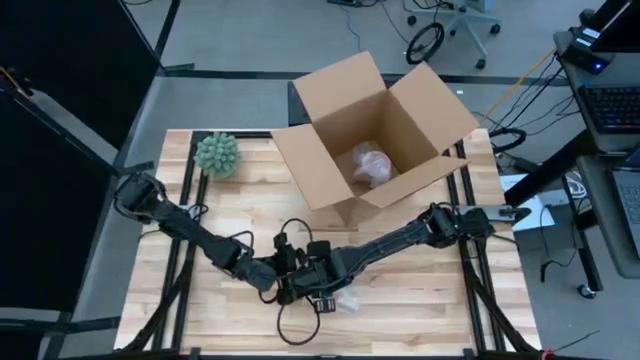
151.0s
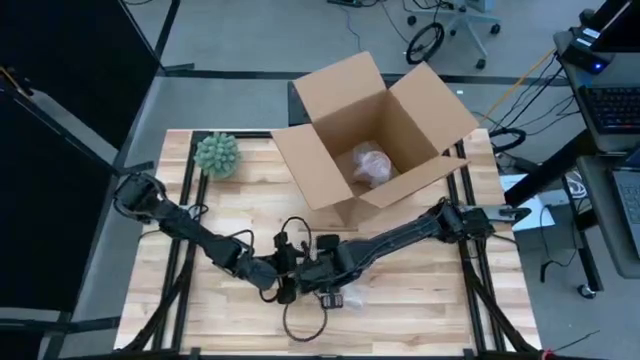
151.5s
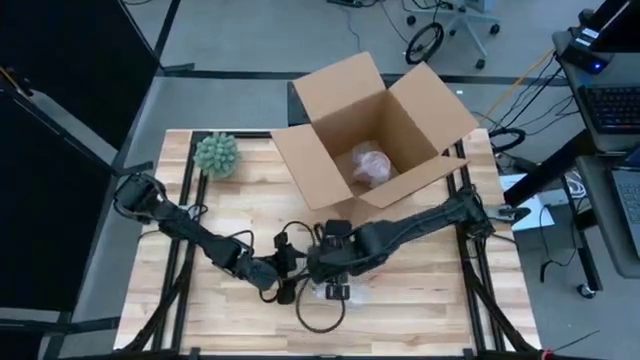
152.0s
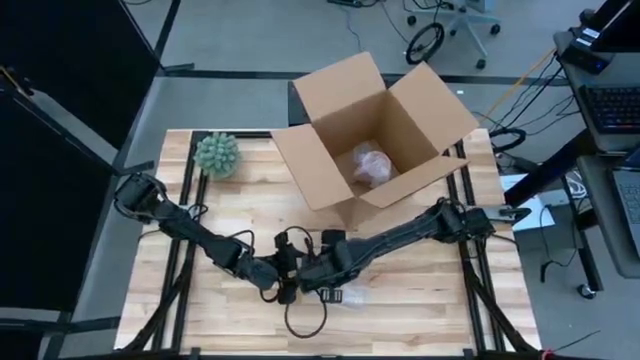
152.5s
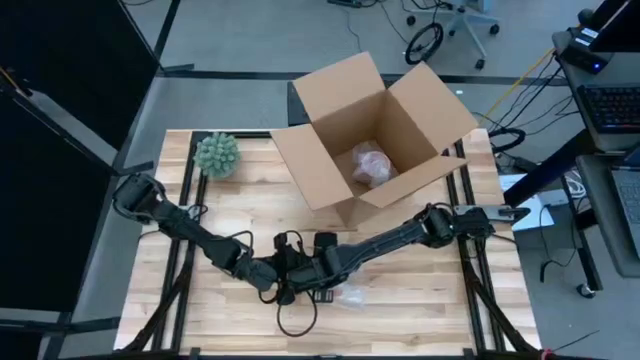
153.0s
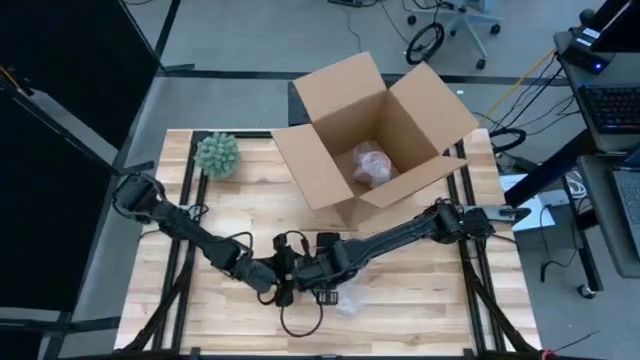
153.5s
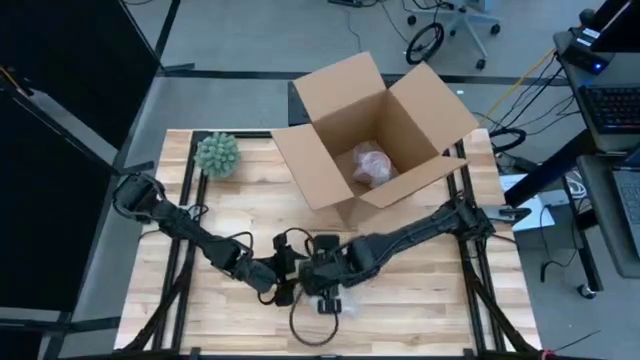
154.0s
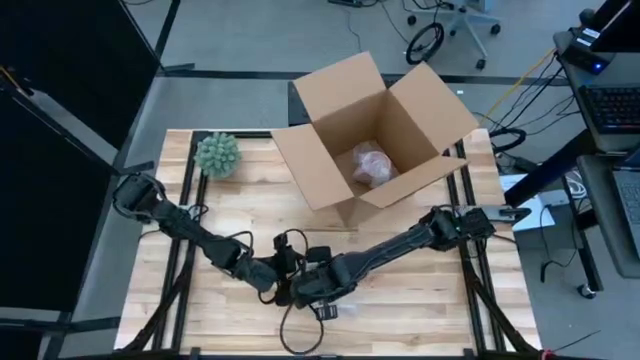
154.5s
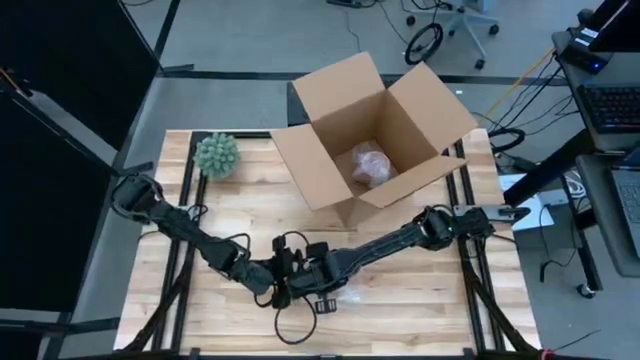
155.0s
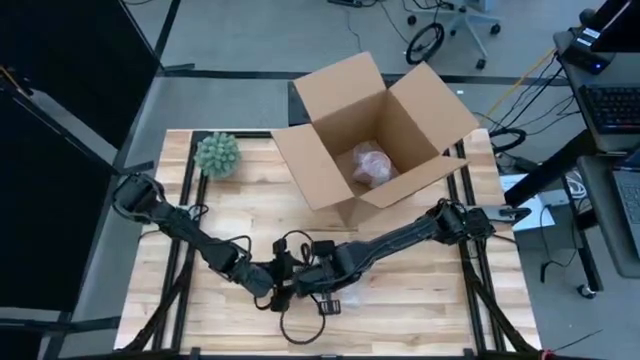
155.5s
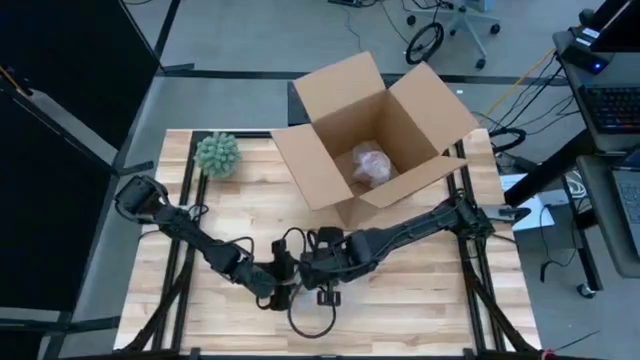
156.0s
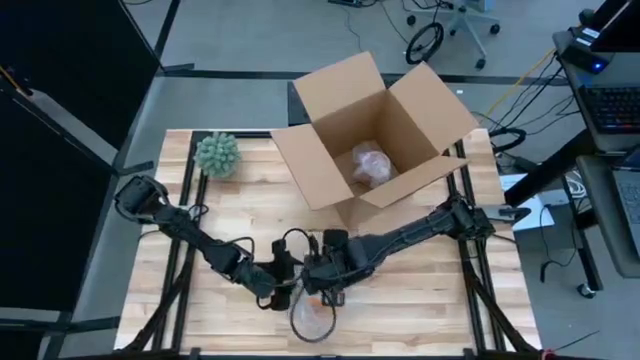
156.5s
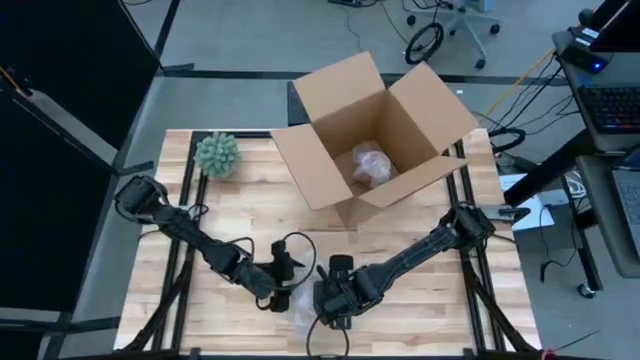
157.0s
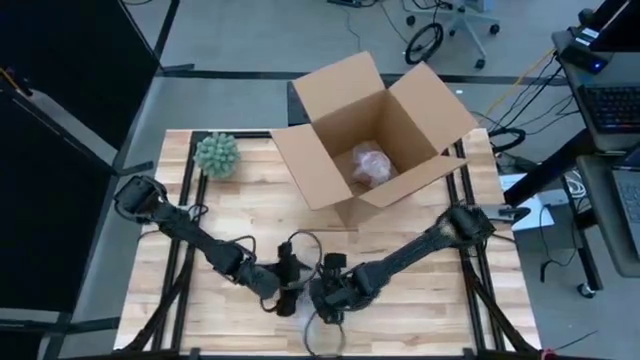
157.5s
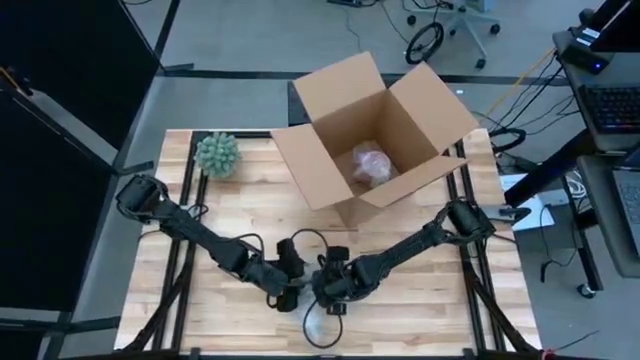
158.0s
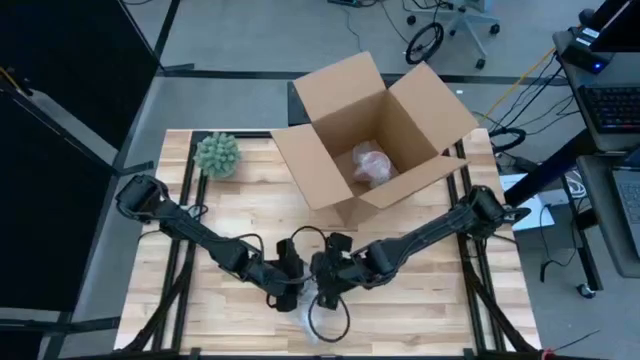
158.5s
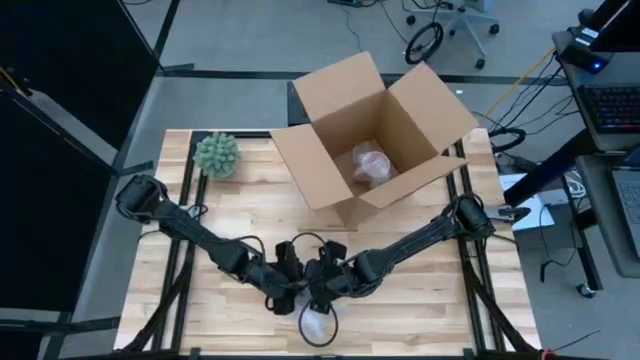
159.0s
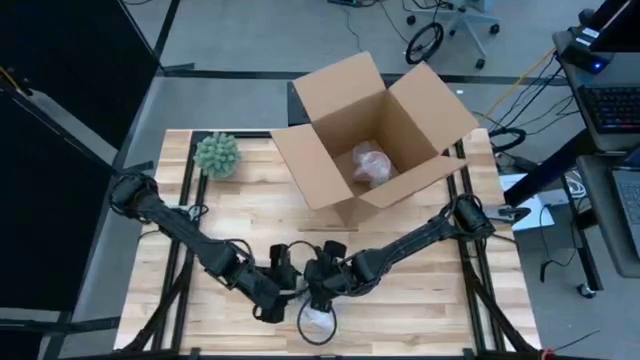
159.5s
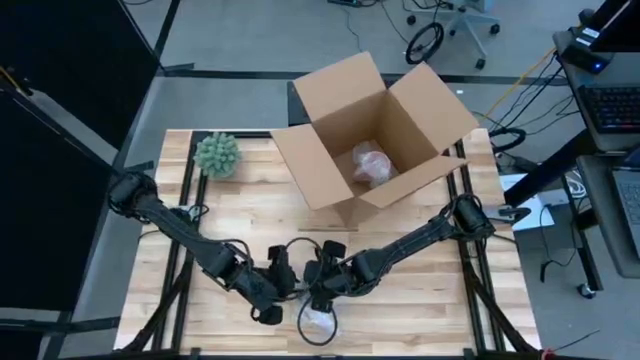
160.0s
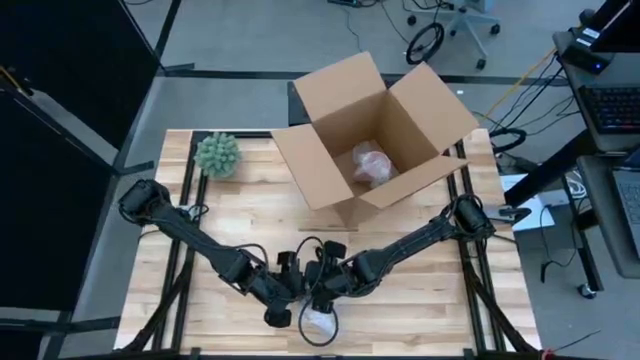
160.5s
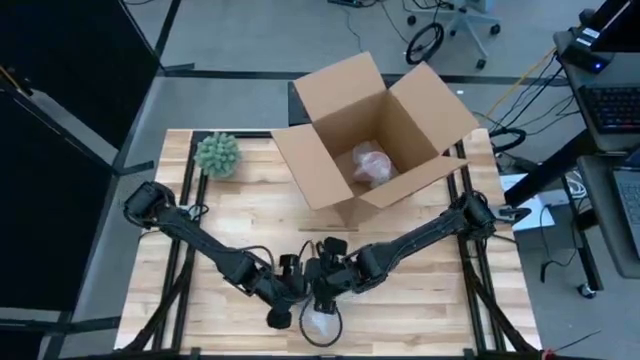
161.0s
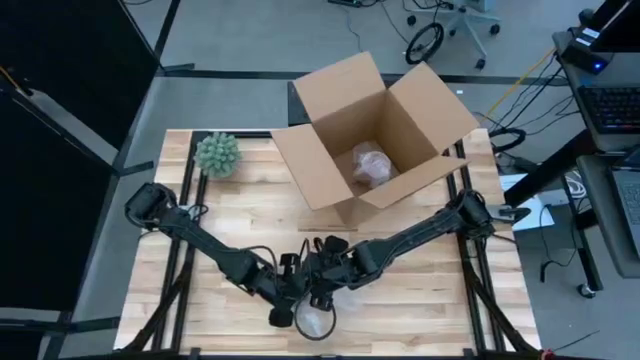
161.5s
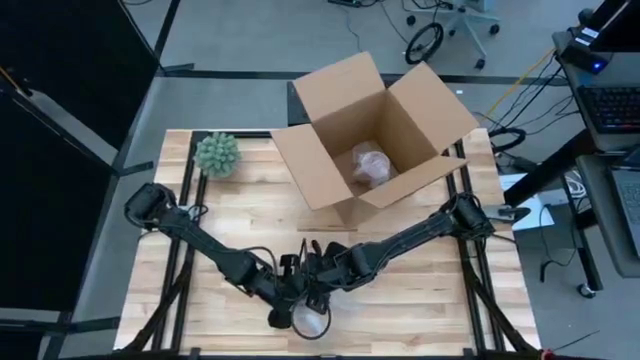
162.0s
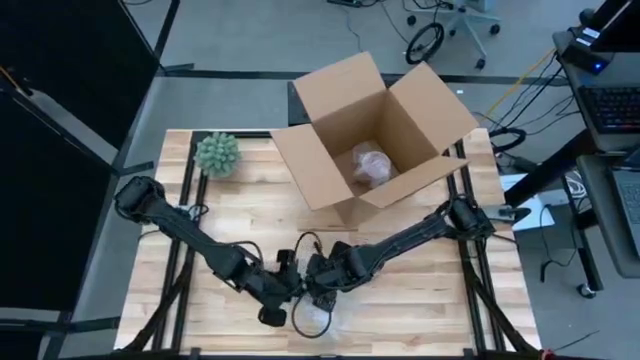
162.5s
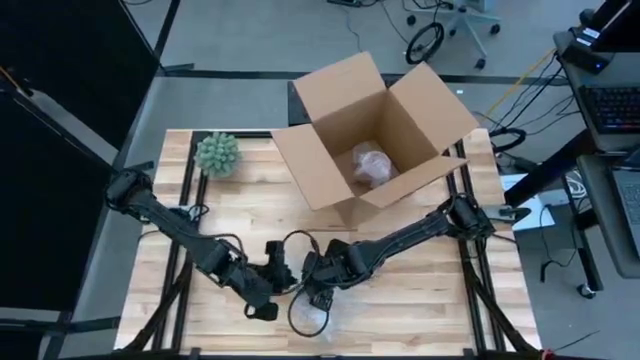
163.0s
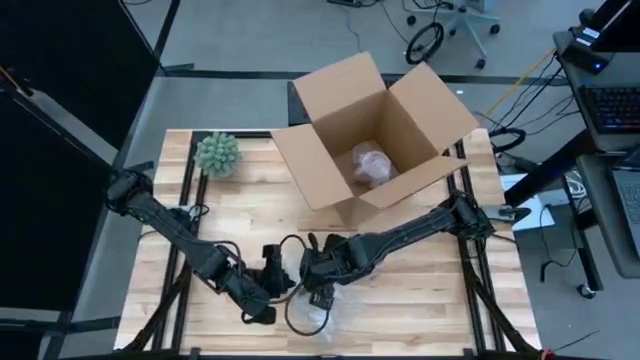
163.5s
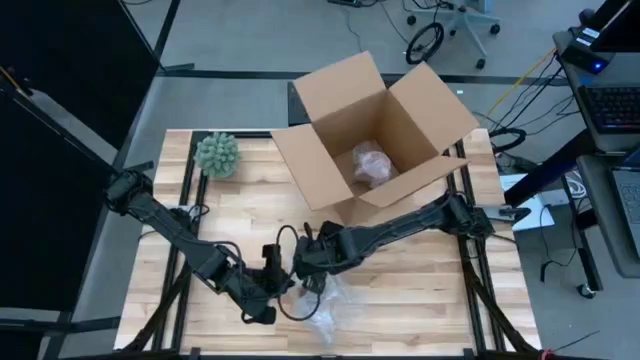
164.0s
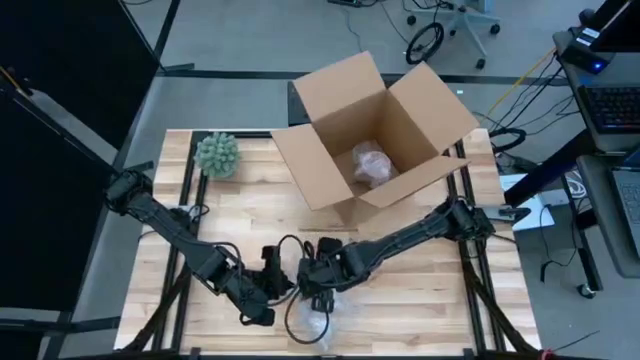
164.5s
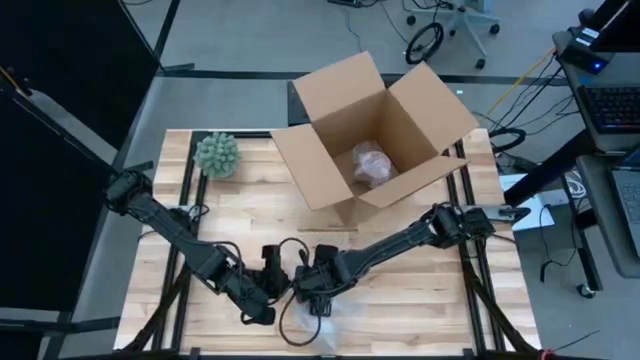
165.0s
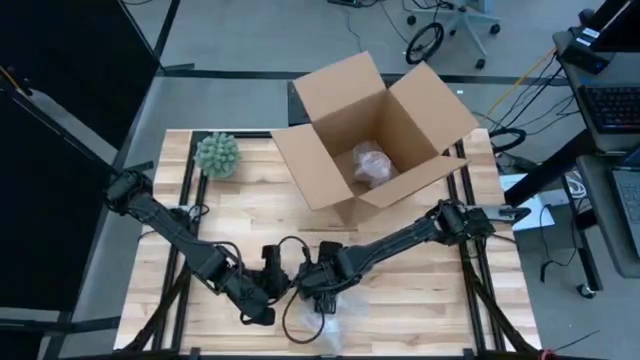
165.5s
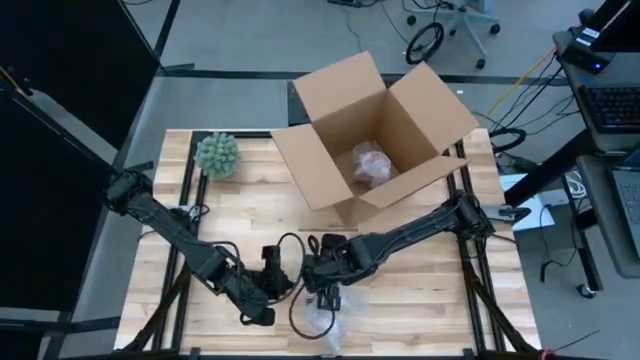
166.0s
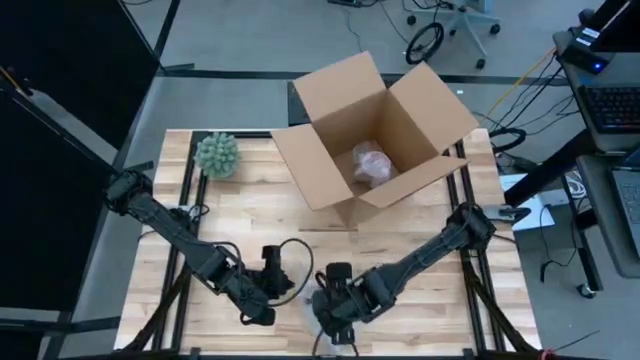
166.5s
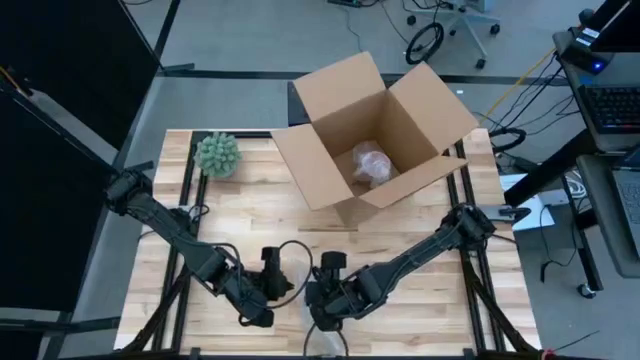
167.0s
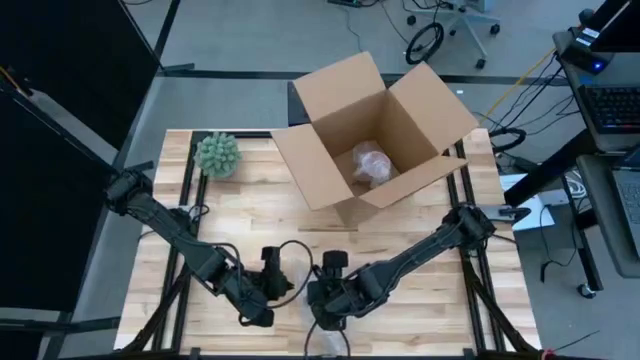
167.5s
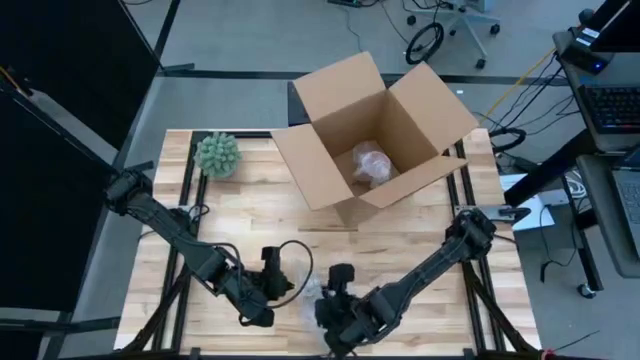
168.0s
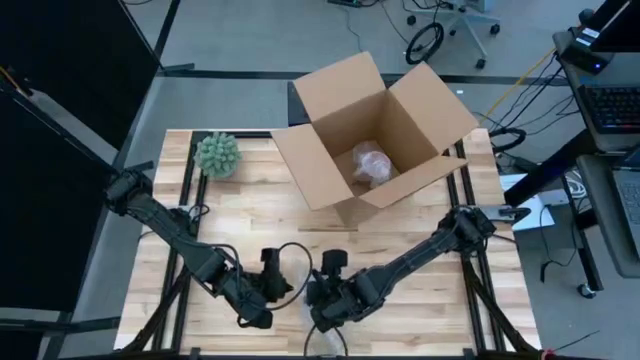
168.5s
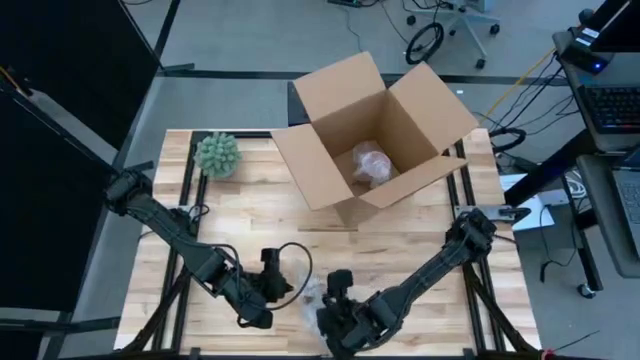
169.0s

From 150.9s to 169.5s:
Task: wrap mug
Wrap the orange mug with bubble wrap

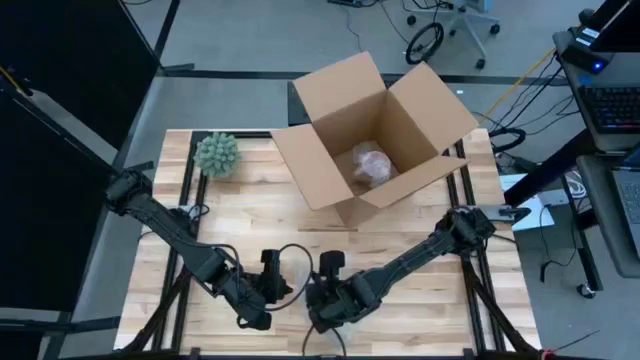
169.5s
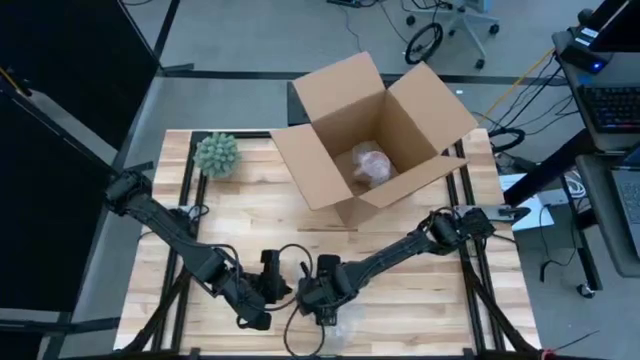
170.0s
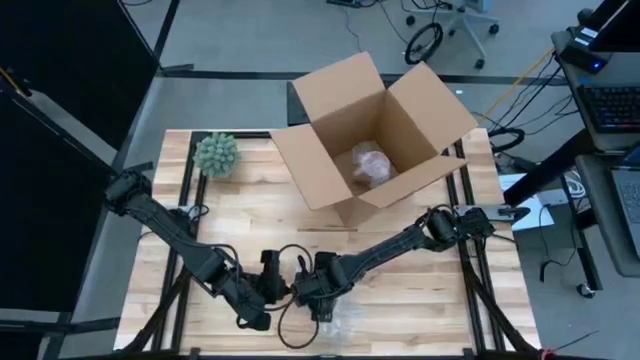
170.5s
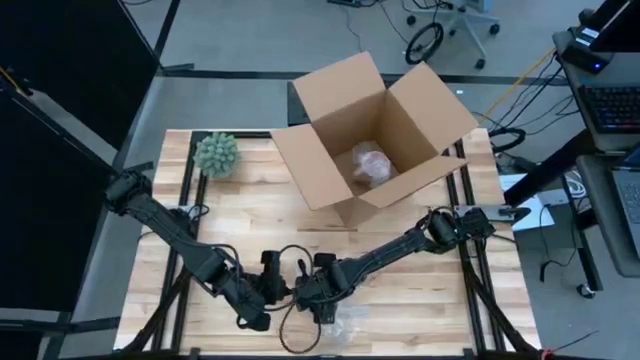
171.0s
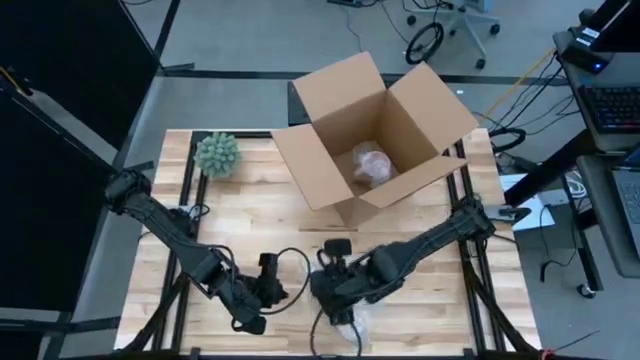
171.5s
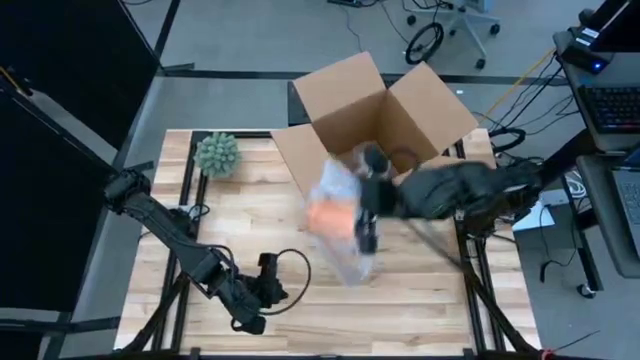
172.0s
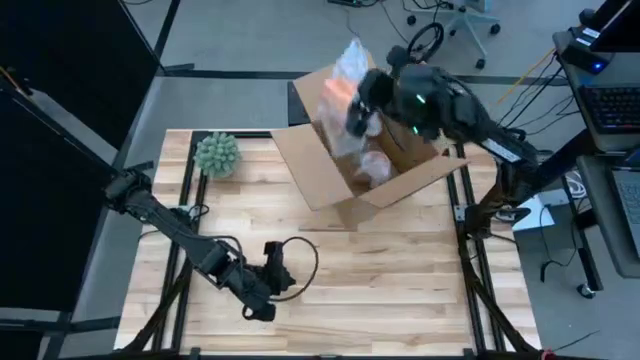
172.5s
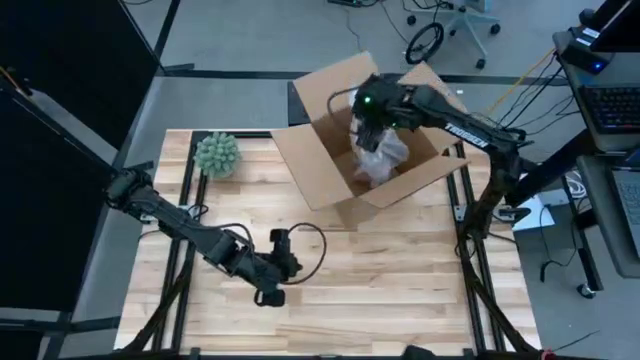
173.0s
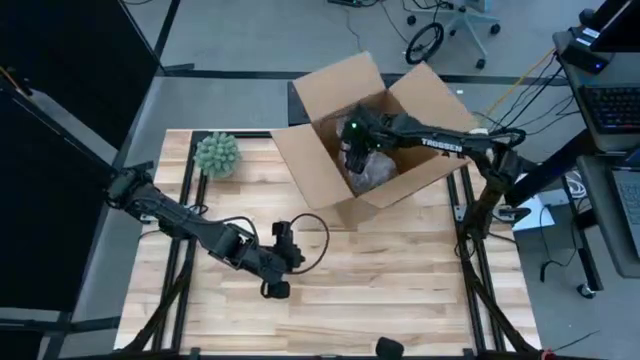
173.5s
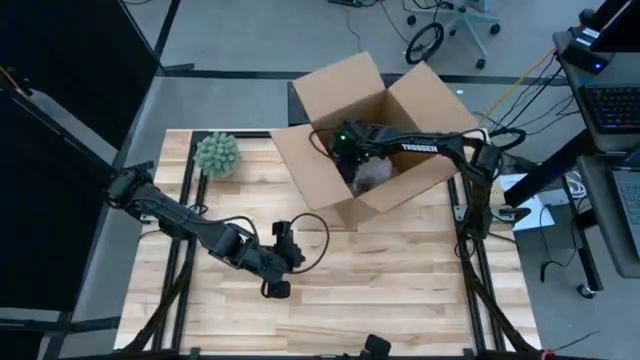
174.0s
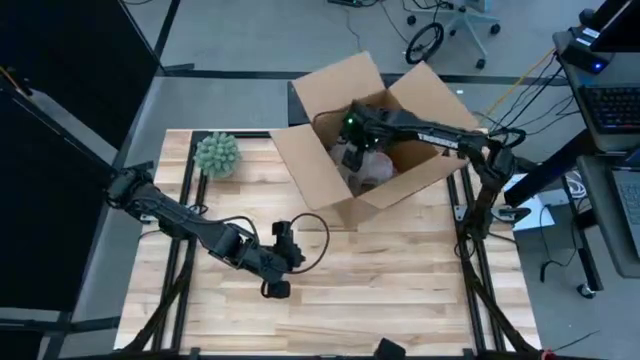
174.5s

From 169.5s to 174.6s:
Put the wrapped orange mug into the cardboard box
